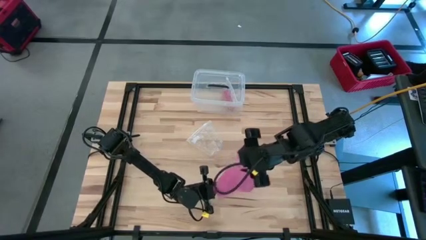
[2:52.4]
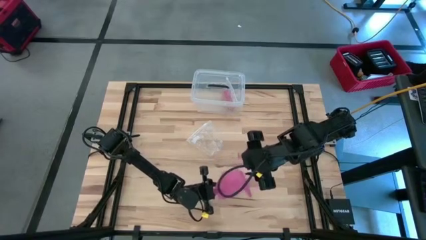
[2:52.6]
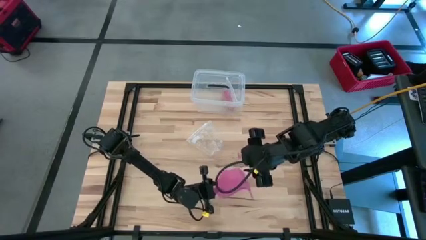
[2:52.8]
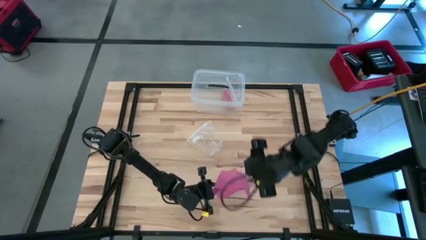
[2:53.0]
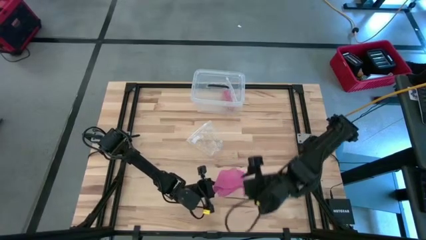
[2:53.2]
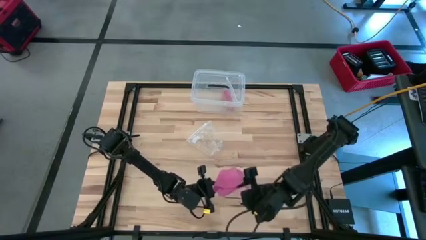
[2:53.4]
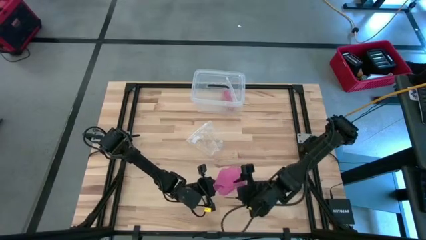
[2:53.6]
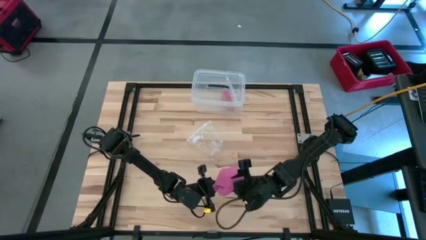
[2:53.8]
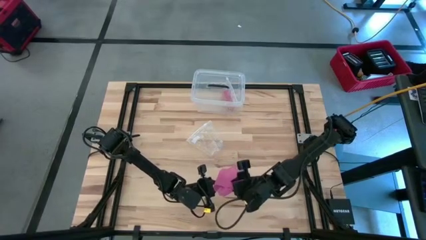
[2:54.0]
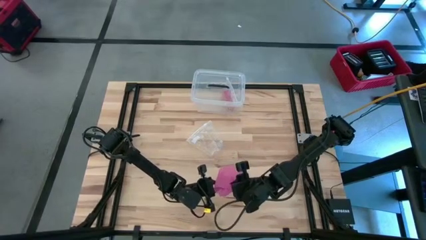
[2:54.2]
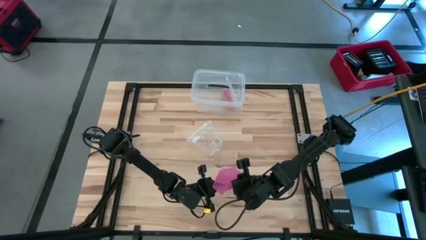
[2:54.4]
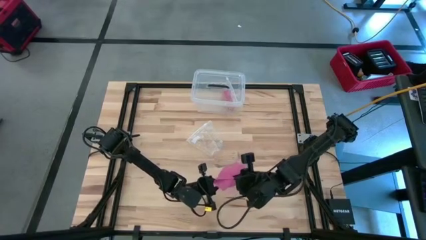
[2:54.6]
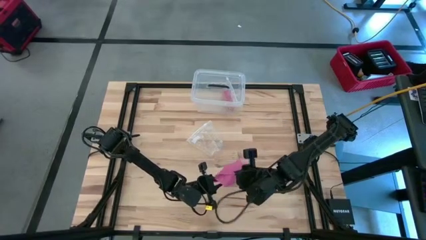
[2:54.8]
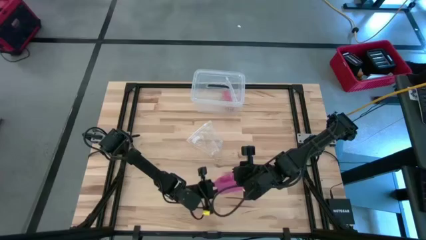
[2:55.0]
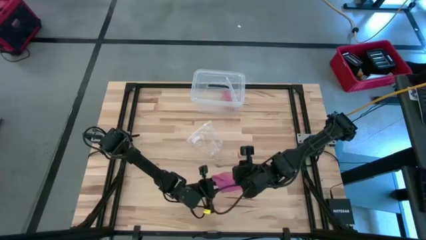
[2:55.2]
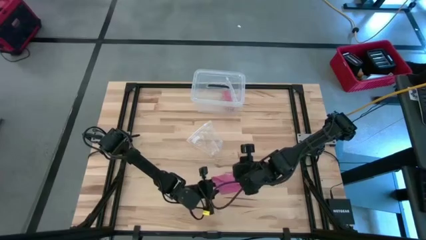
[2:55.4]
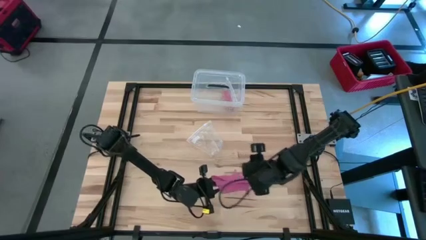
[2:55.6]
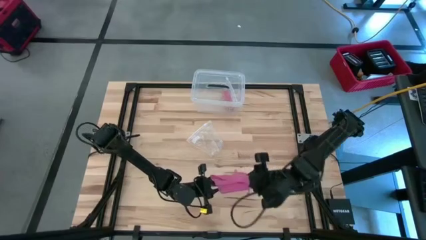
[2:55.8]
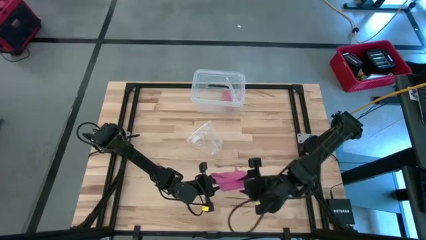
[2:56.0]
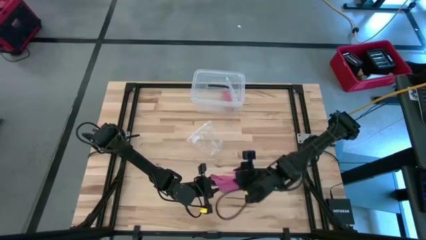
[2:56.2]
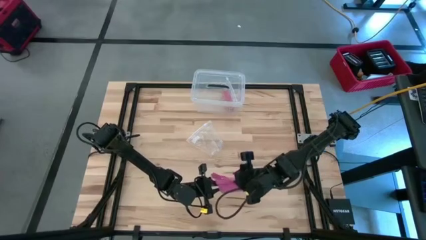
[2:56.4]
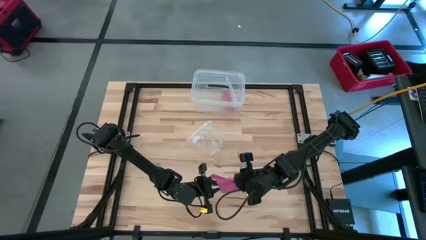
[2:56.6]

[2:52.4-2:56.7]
Task: Roll bandage
Roll the pink bandage

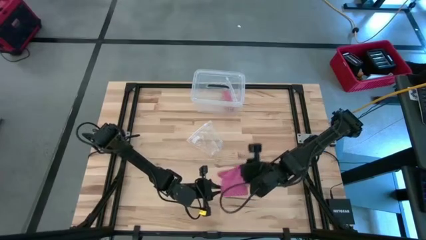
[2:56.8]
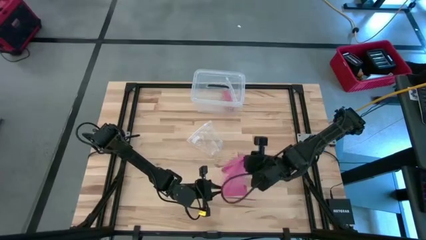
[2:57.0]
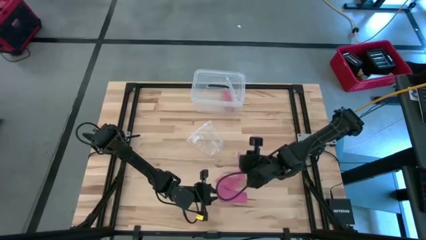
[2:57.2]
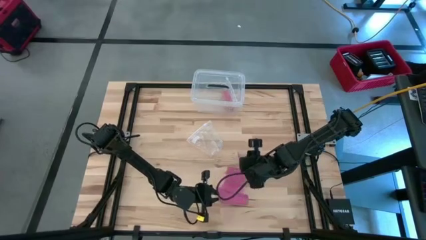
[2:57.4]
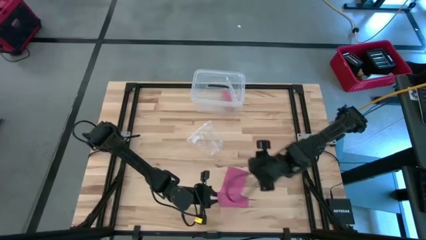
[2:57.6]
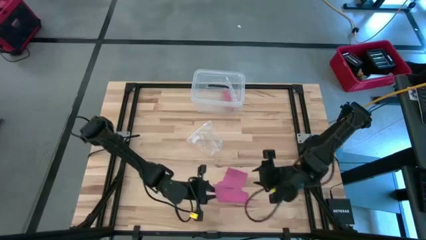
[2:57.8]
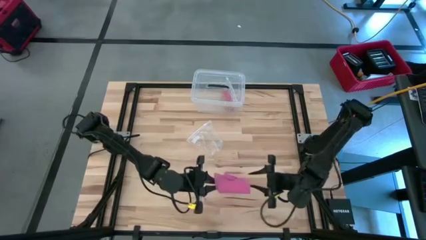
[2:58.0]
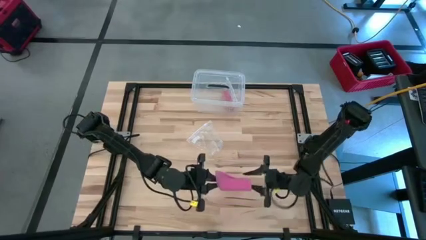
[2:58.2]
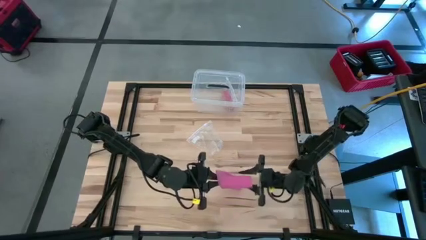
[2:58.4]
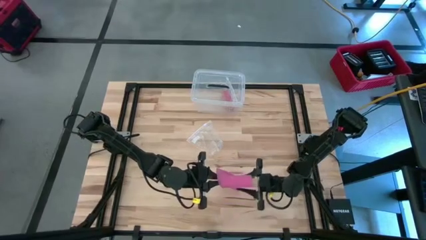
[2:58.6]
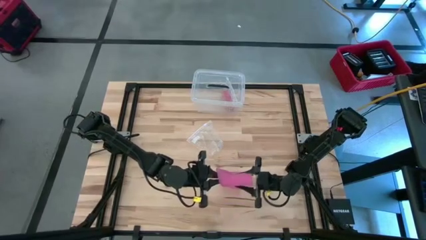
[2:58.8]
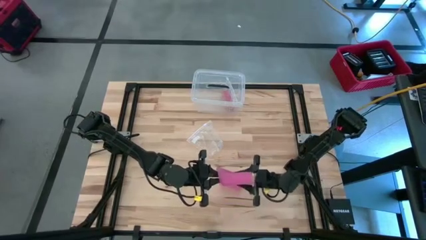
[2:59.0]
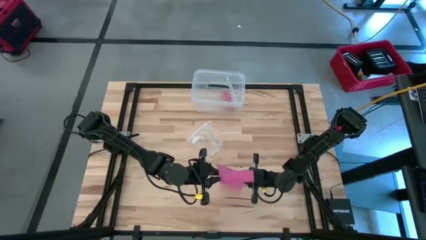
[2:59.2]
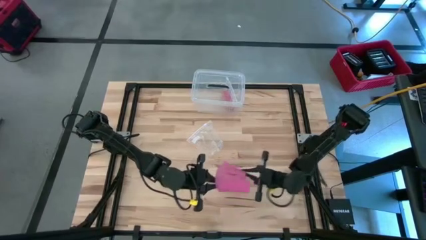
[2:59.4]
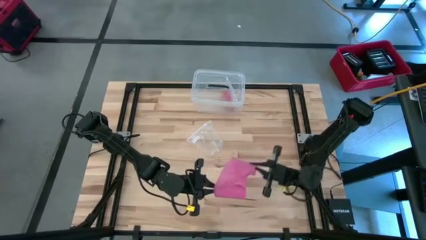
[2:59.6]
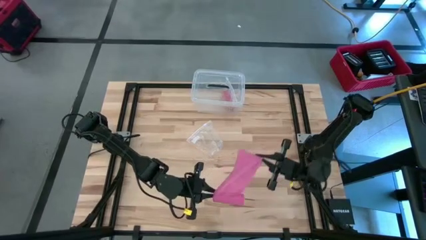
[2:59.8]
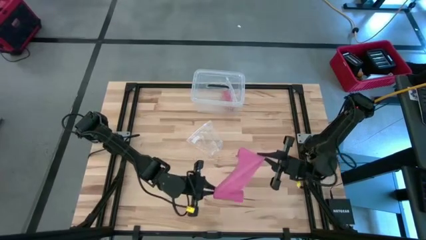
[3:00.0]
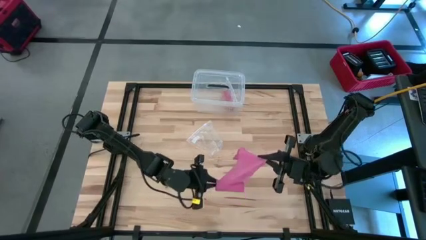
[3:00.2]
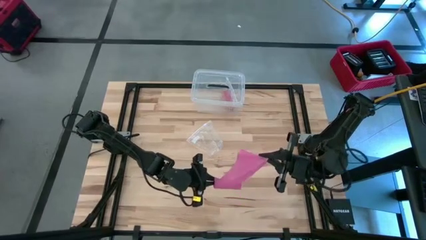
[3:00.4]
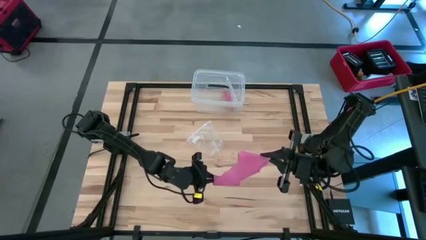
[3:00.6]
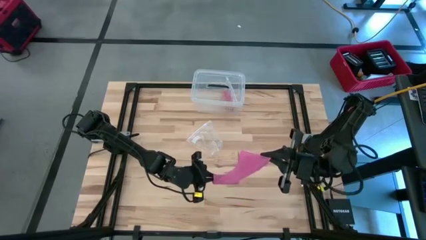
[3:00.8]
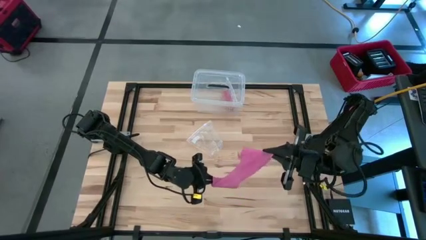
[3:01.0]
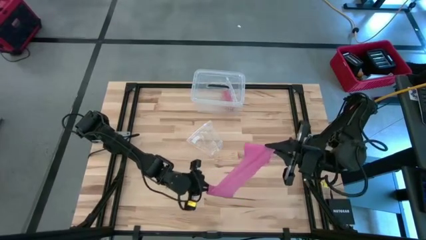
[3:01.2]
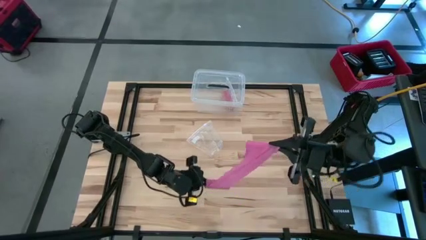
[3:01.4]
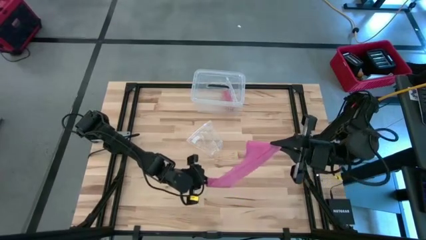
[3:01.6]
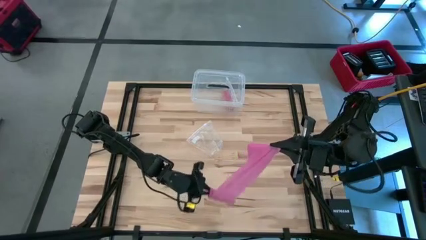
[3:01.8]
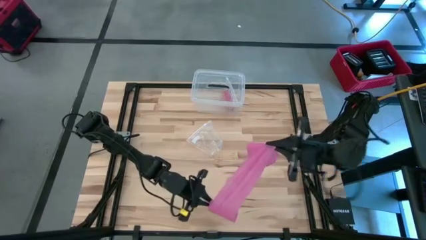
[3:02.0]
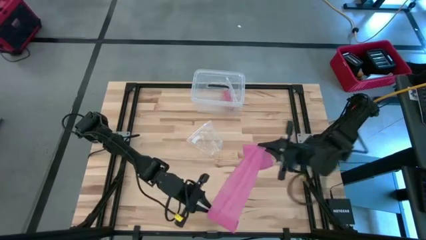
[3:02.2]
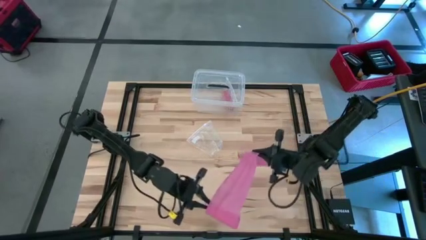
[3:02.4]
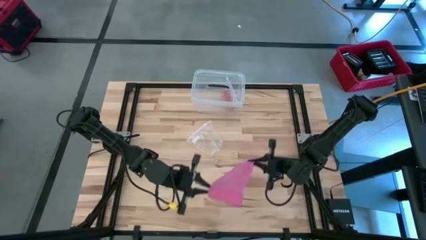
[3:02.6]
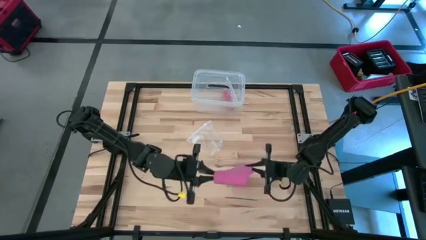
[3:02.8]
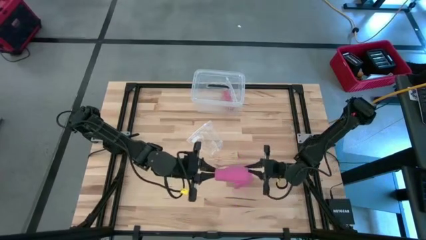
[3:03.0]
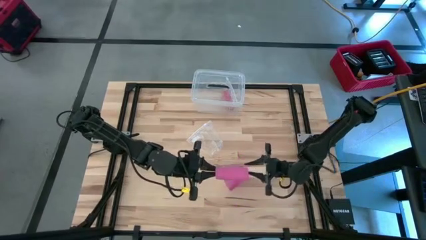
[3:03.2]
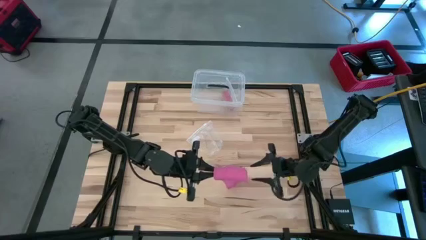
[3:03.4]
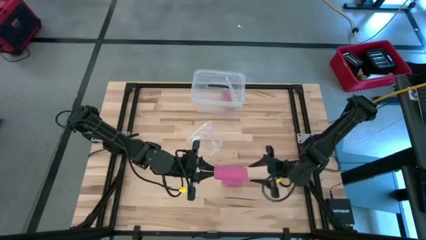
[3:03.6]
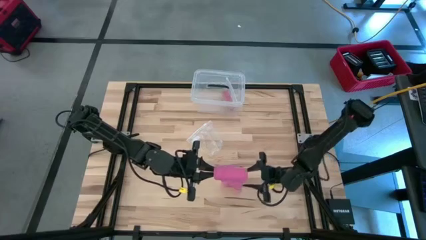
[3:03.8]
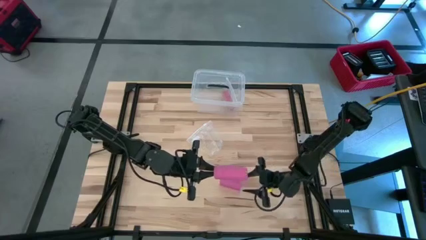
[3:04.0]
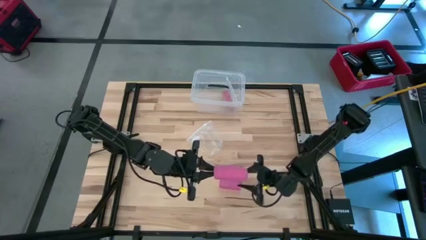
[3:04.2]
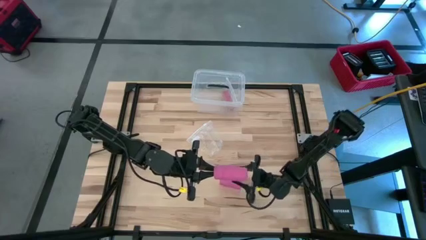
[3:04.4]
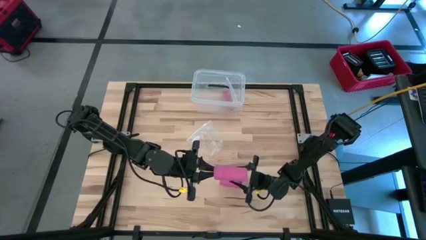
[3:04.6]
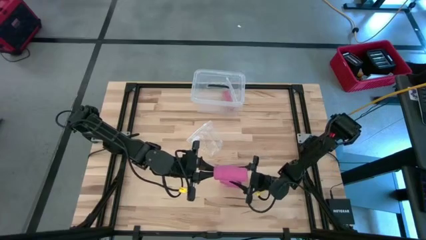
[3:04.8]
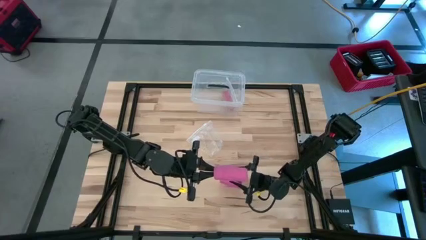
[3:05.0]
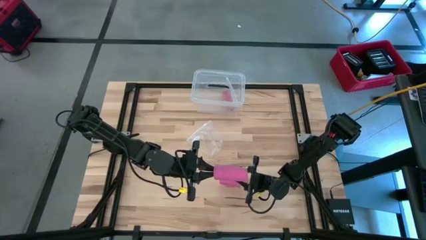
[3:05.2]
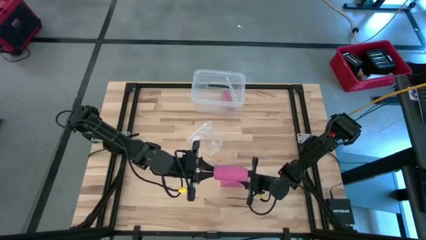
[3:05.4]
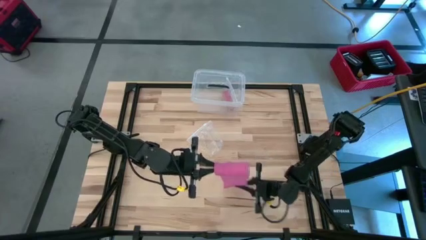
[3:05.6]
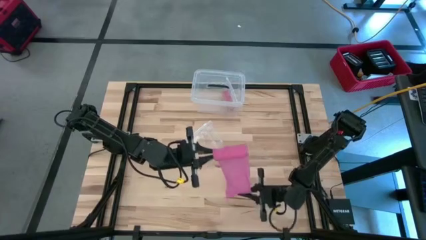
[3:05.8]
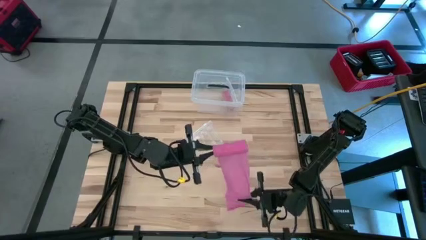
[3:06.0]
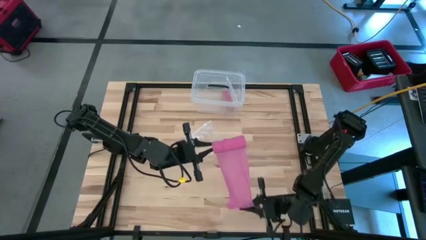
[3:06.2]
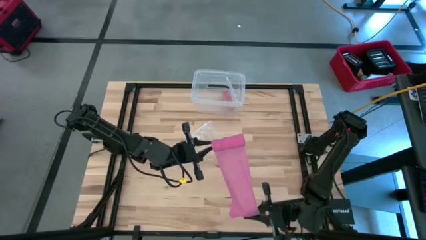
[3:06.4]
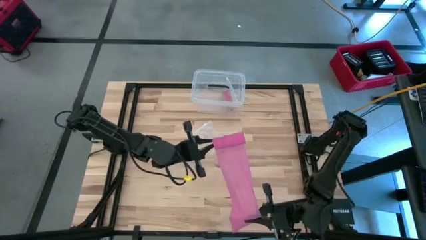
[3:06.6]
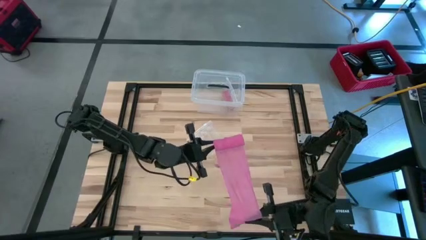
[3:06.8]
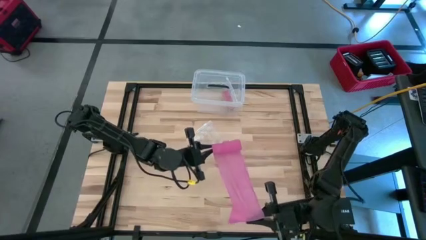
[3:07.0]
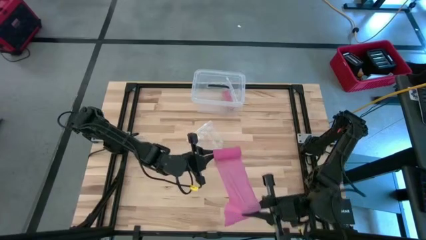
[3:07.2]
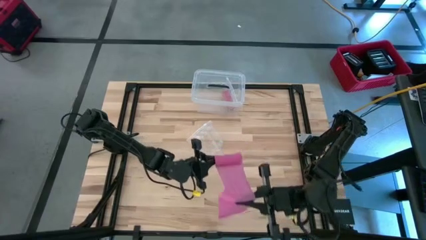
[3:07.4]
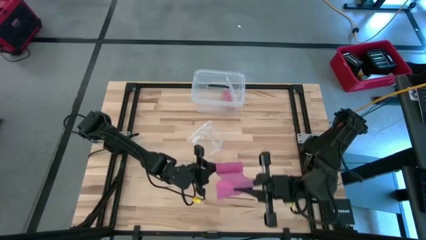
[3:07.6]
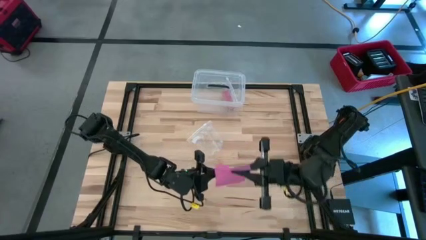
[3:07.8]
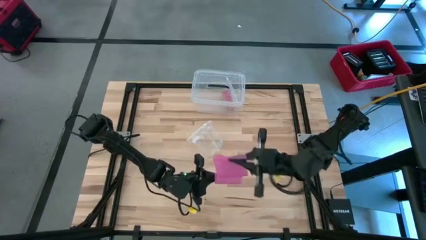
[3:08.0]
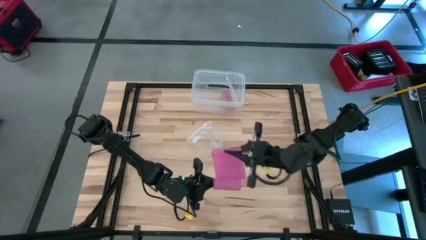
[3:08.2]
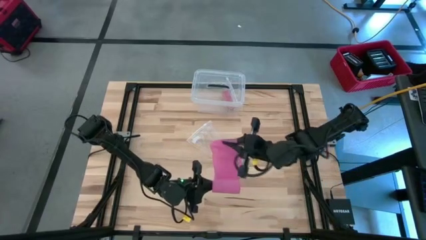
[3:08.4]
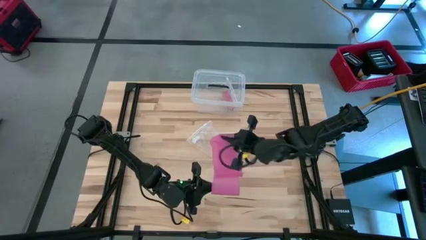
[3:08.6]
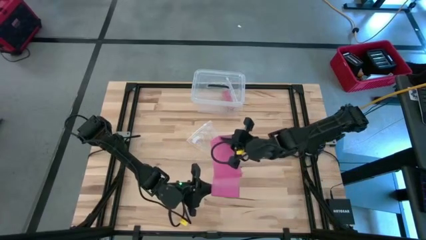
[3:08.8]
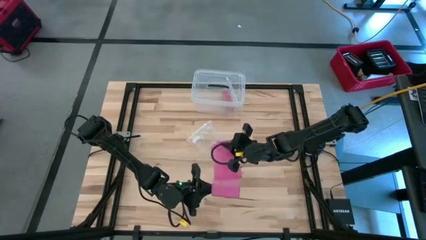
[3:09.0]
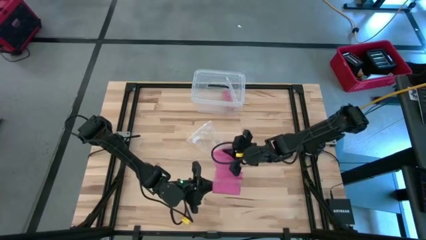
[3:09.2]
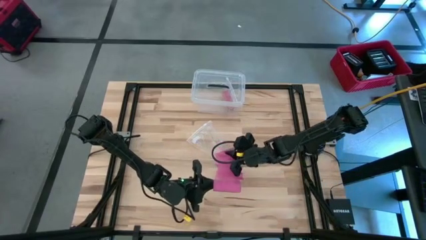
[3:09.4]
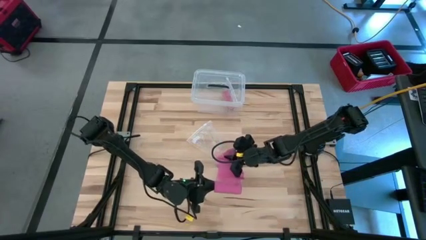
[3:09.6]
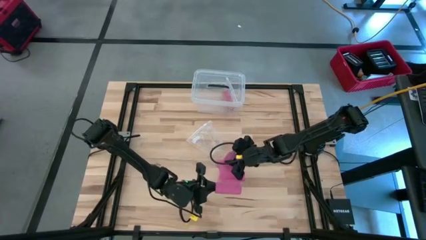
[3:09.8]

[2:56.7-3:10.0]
Roll the pink bandage
